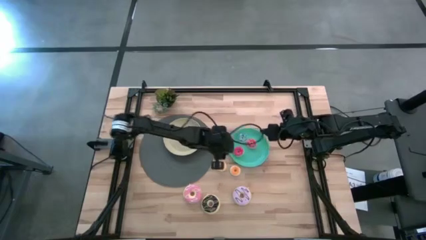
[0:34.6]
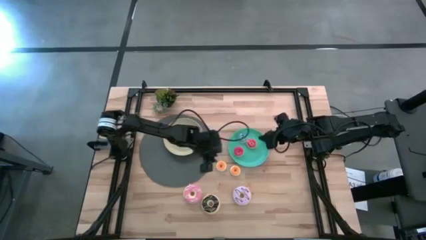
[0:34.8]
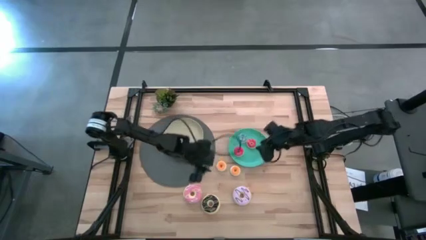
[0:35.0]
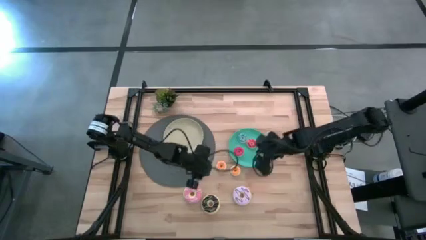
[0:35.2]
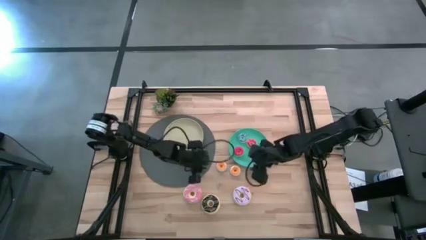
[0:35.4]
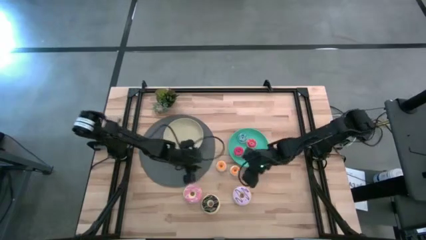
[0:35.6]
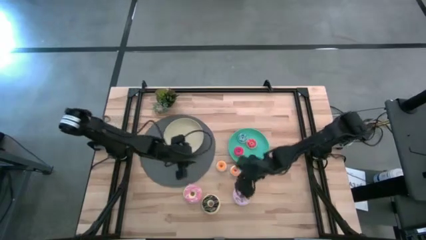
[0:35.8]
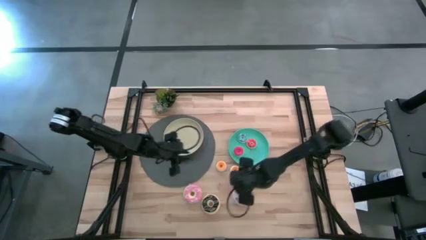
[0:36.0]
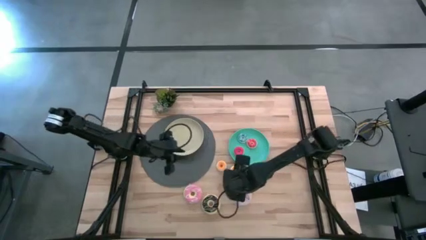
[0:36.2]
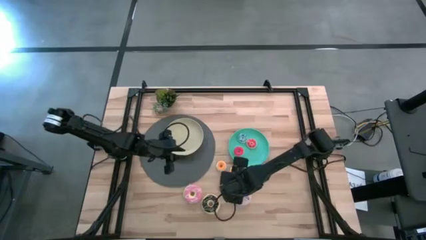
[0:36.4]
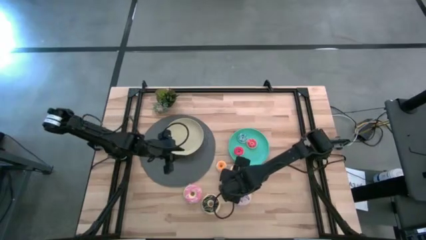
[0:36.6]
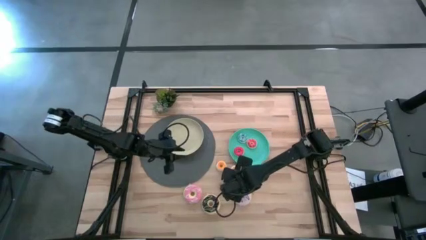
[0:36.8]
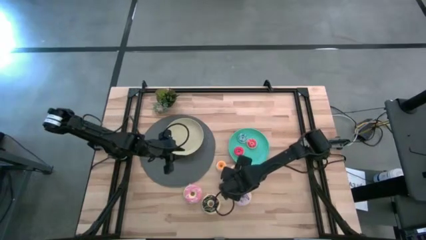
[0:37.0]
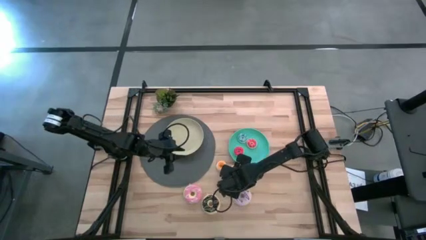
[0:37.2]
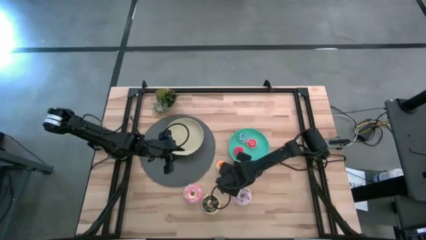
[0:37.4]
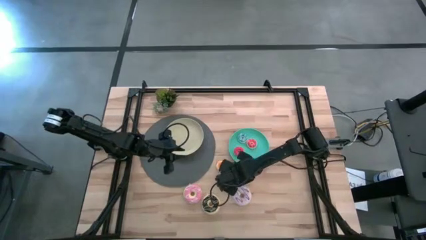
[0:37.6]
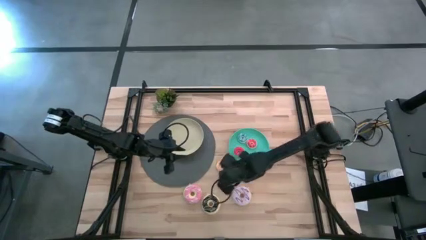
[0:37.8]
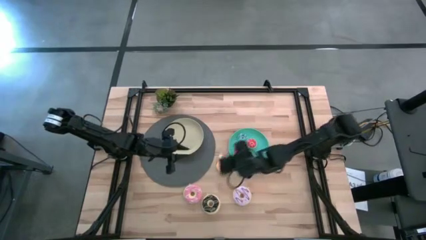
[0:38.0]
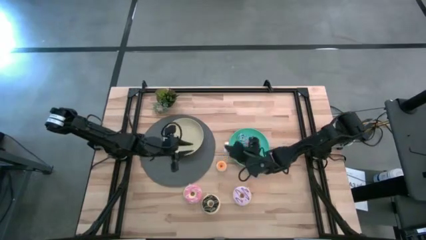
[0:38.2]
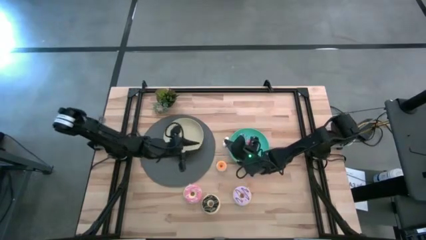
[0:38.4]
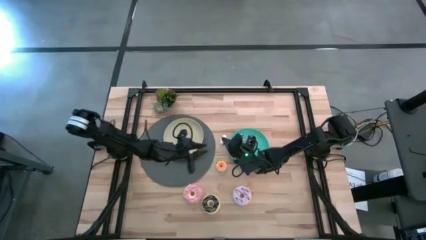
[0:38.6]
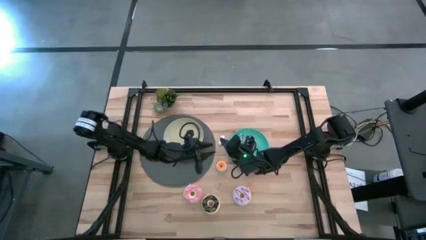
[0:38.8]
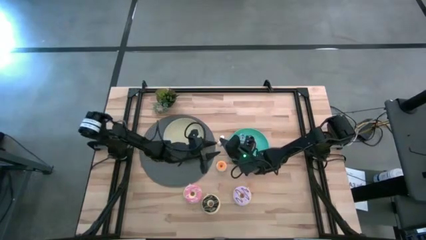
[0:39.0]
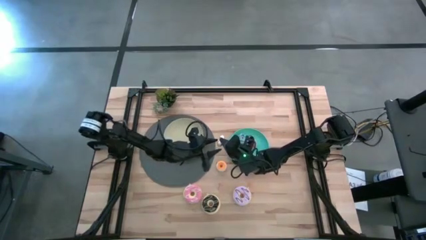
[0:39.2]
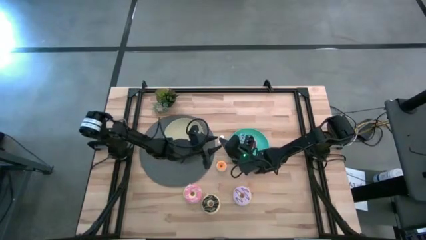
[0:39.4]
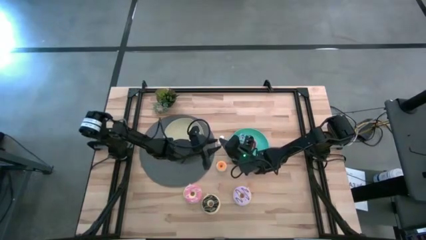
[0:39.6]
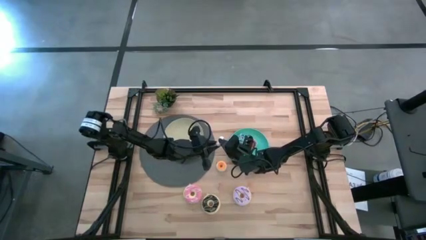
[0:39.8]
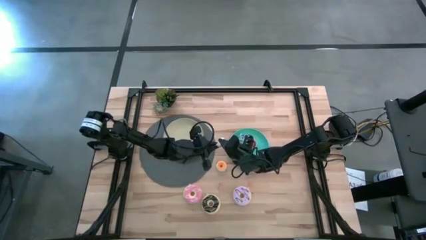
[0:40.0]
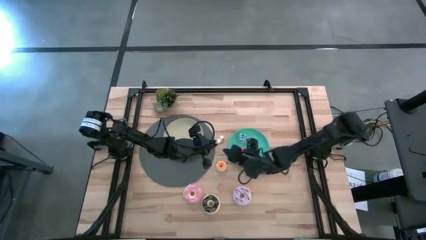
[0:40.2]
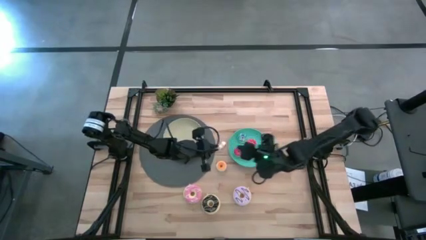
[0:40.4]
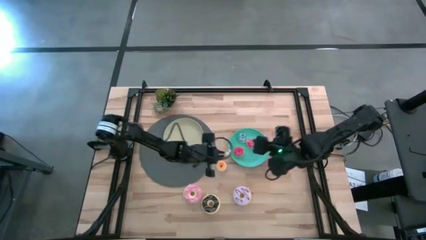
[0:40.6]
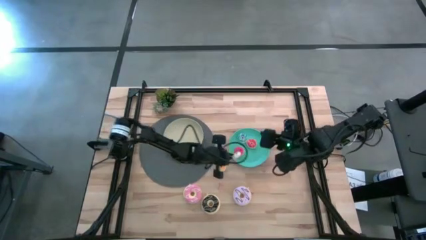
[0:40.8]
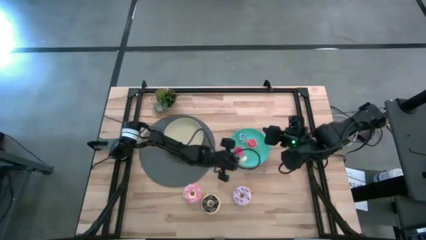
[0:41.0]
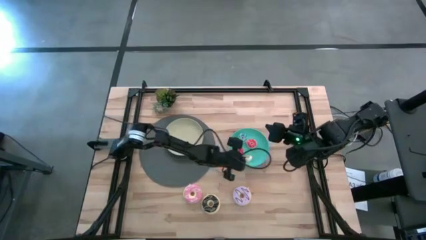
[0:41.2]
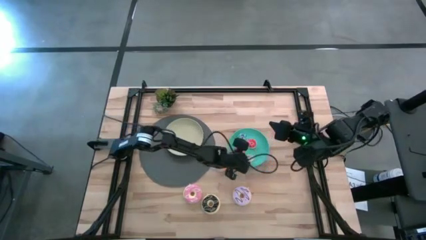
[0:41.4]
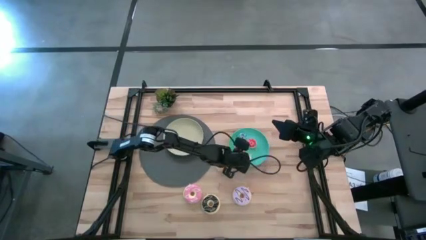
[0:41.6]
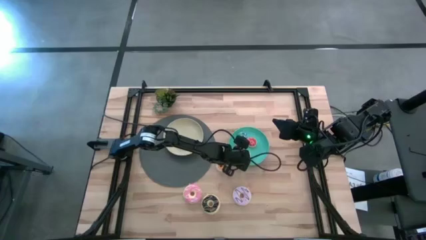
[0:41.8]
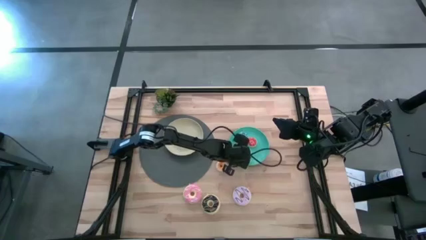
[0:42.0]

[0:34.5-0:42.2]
Task: Pick & Place donuts
Put the small white donut on the light blue plate

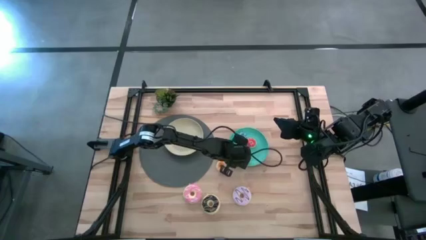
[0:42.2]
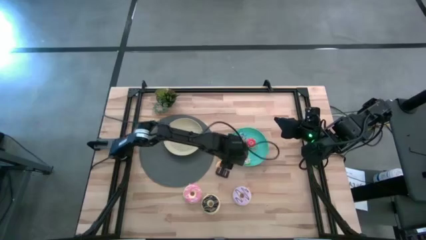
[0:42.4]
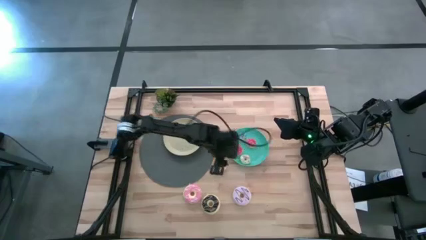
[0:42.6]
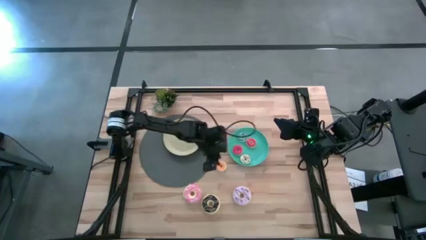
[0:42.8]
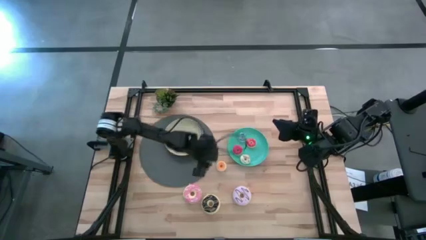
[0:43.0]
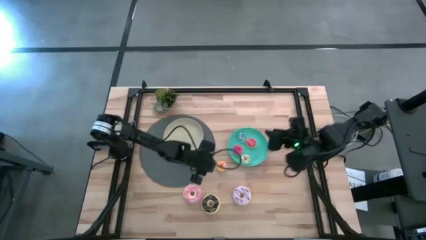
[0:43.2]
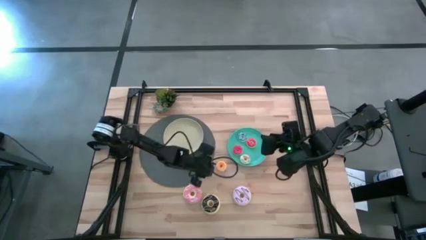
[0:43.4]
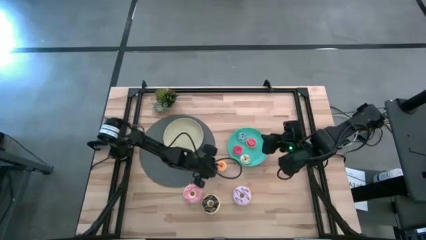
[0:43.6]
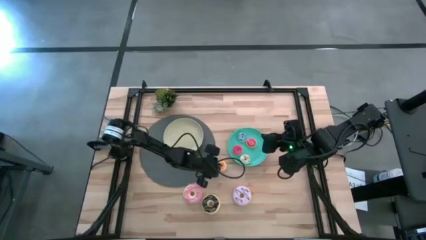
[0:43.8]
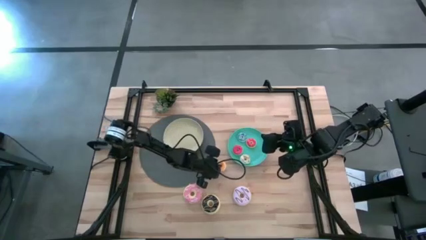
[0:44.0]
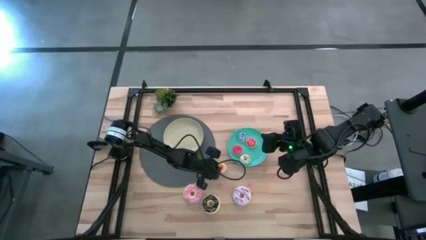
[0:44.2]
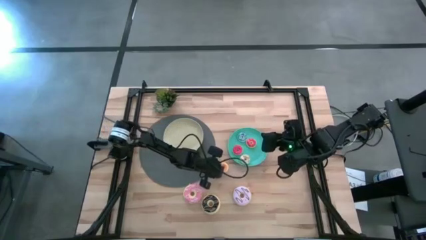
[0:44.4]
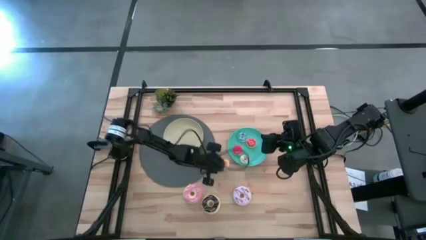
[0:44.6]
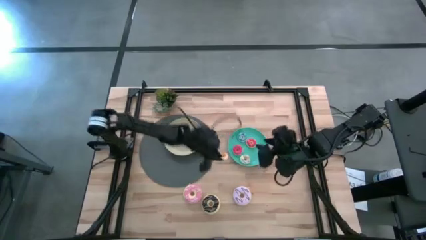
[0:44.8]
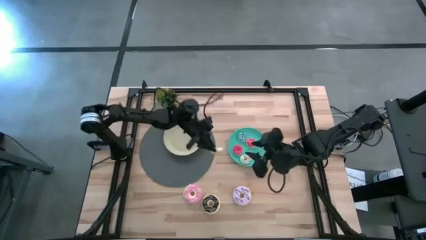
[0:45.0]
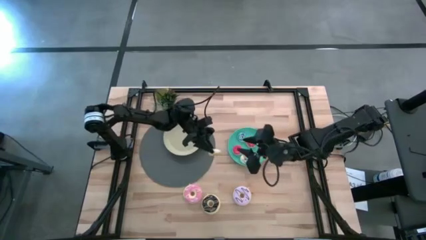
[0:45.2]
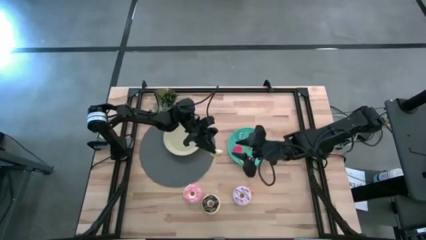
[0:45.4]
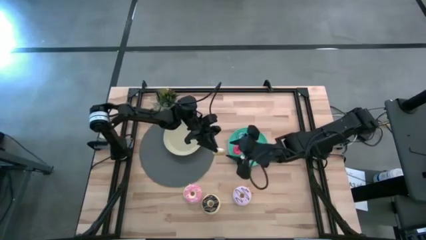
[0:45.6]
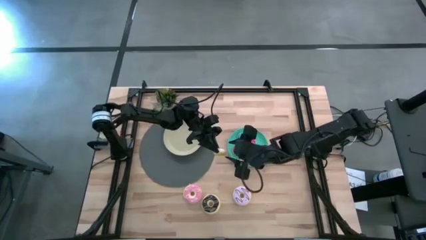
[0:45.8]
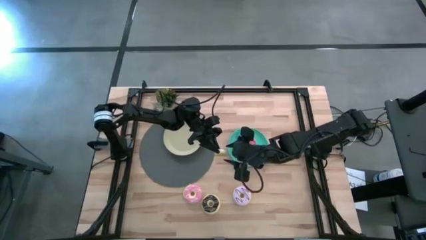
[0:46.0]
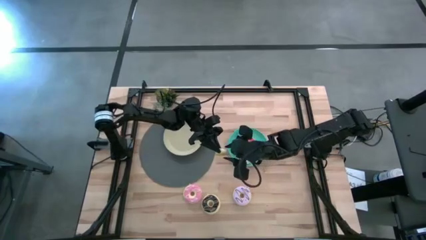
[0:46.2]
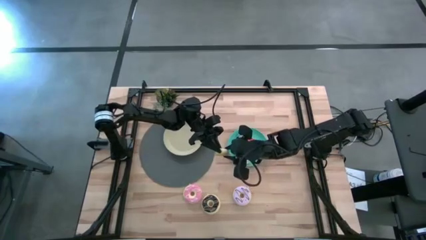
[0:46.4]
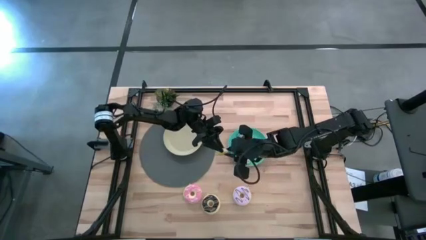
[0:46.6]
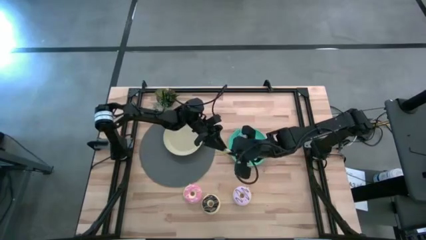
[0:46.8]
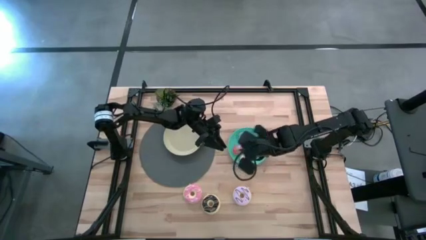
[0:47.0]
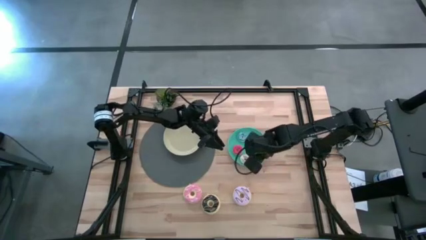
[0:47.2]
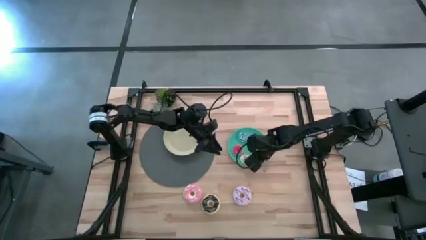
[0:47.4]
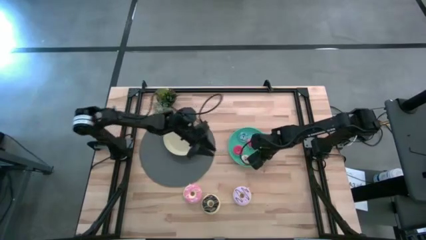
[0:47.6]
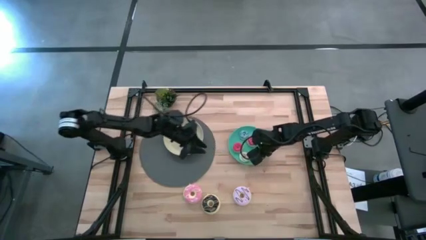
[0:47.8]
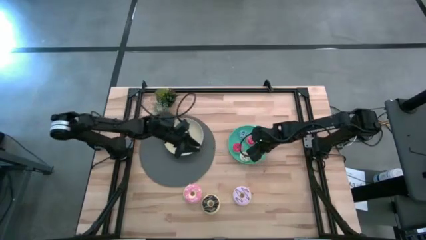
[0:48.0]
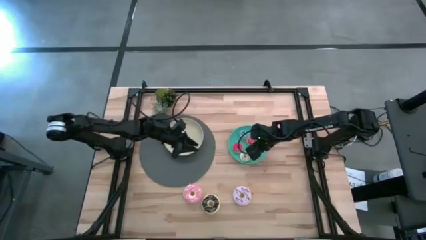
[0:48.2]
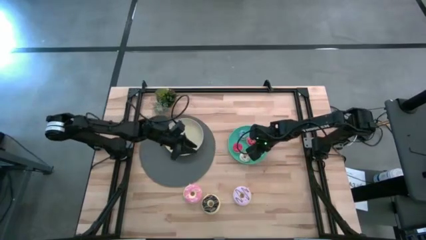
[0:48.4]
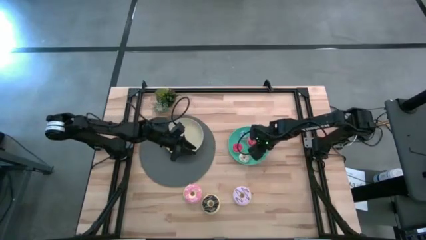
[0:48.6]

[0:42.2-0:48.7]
Put the small yellow donut on the light blue plate

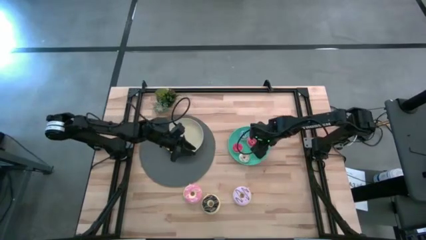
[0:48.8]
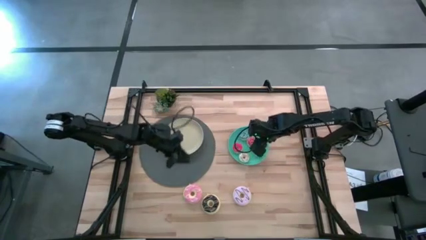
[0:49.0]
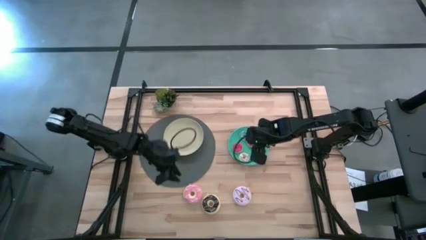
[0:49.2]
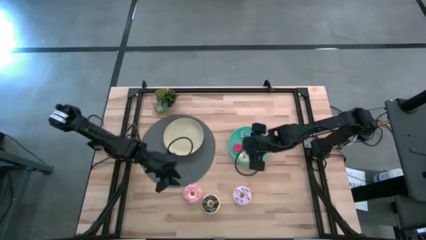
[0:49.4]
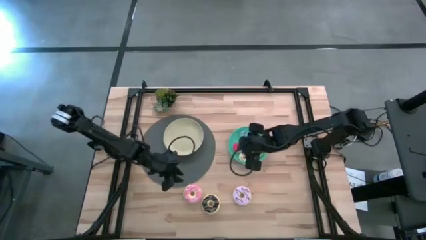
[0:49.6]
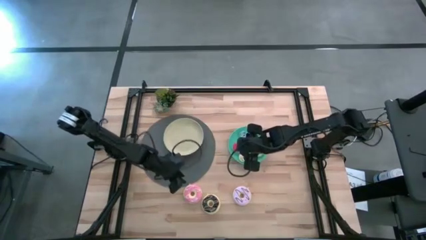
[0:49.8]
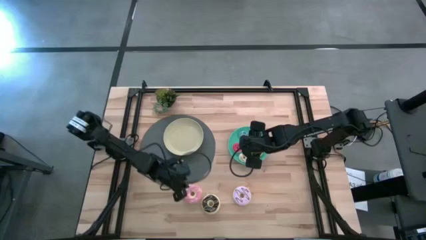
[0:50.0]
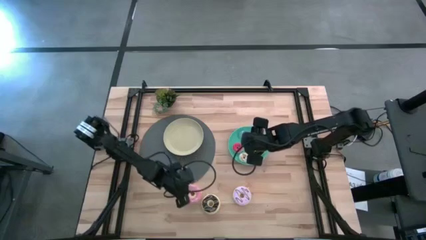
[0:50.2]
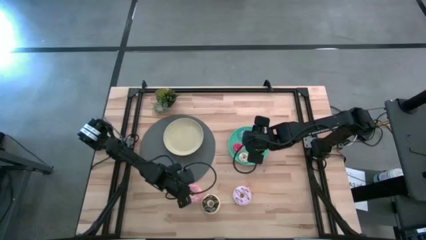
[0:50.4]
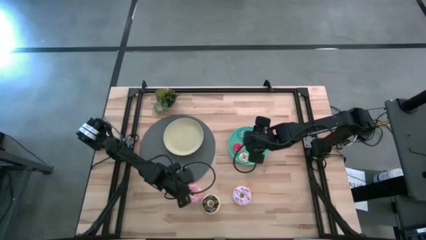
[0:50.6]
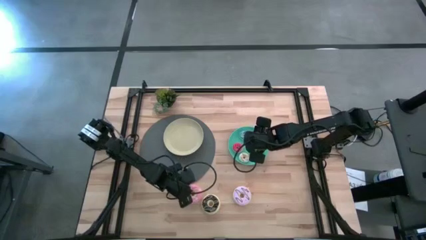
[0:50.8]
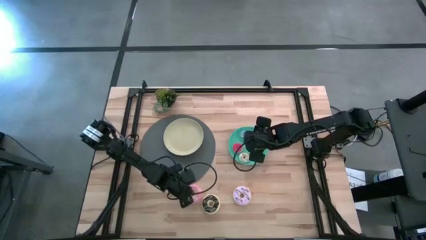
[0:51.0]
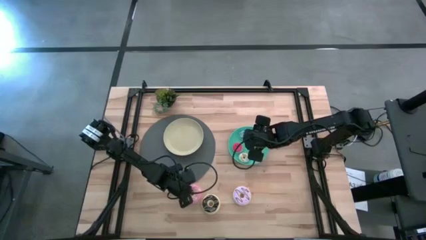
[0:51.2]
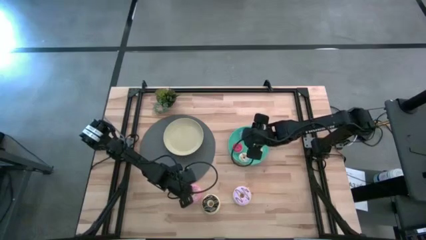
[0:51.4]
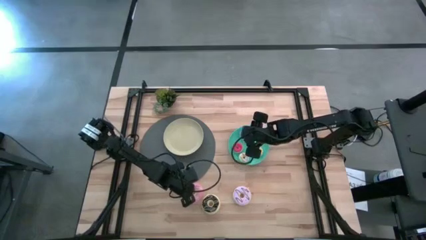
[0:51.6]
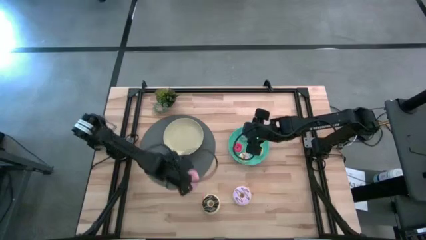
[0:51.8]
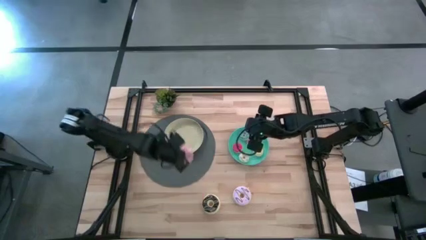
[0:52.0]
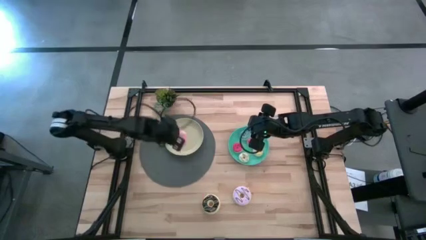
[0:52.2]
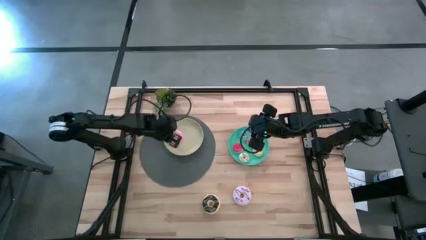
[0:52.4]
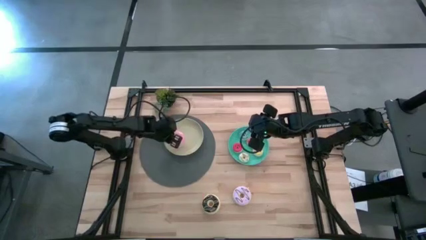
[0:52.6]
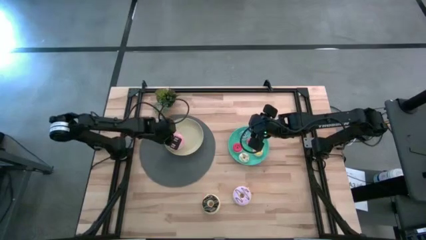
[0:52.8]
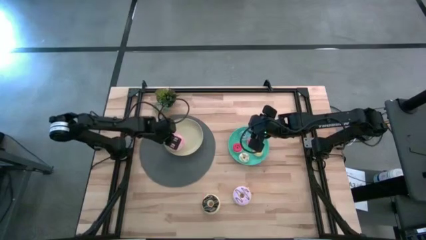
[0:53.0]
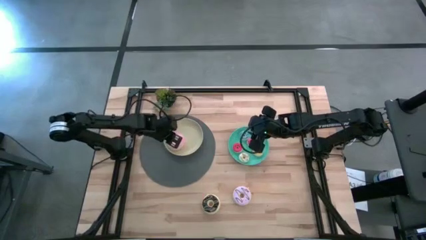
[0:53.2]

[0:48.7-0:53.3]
Put the large pink donut on the light brown plate
